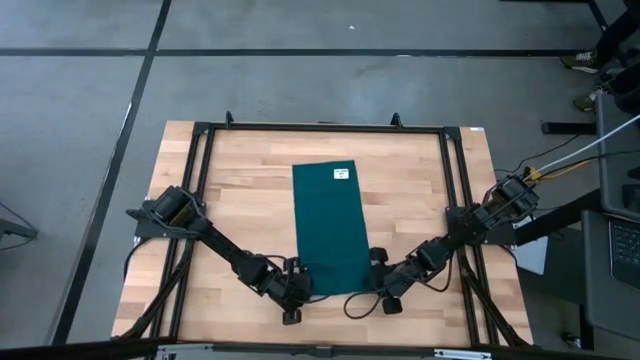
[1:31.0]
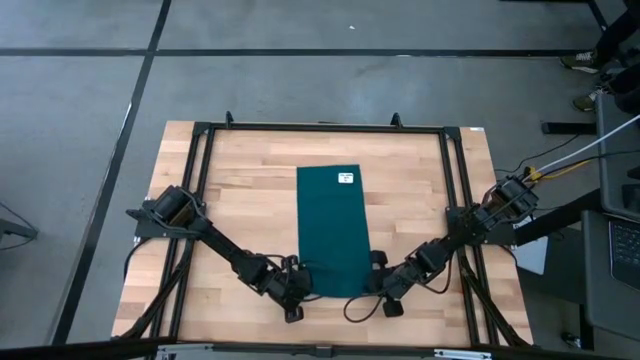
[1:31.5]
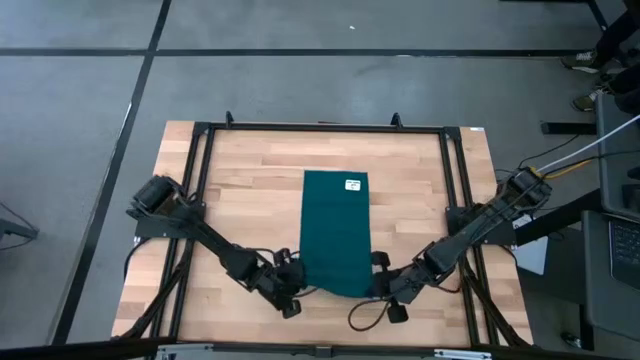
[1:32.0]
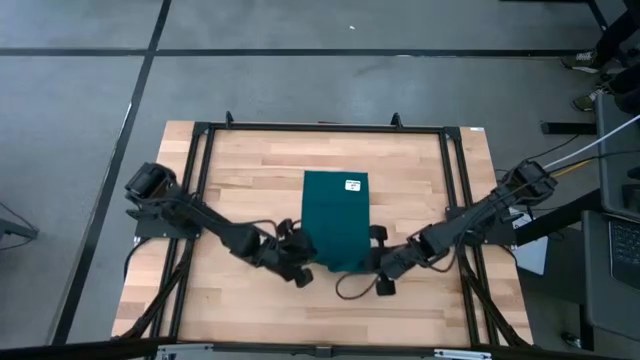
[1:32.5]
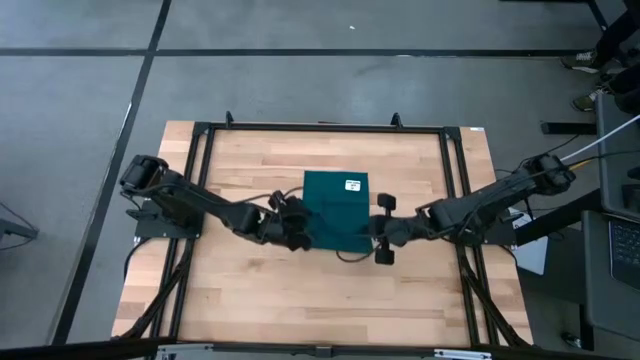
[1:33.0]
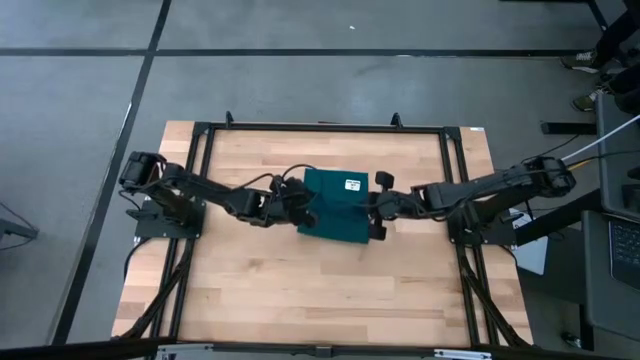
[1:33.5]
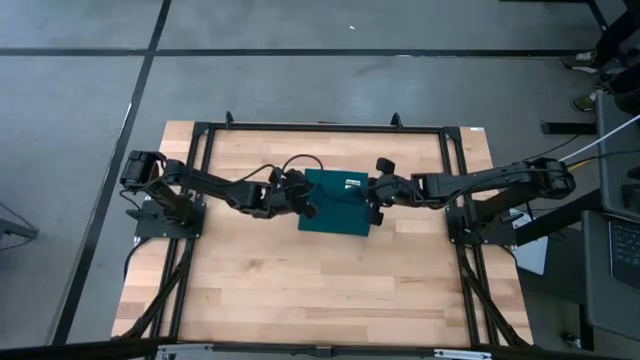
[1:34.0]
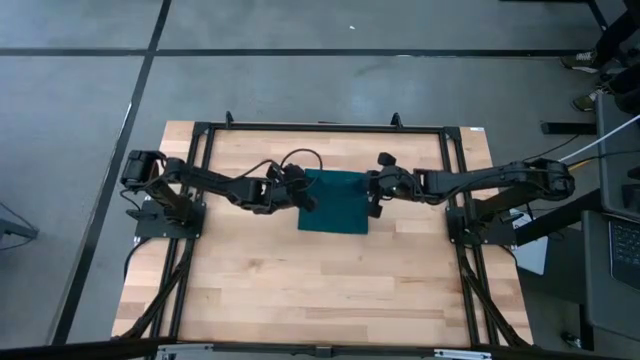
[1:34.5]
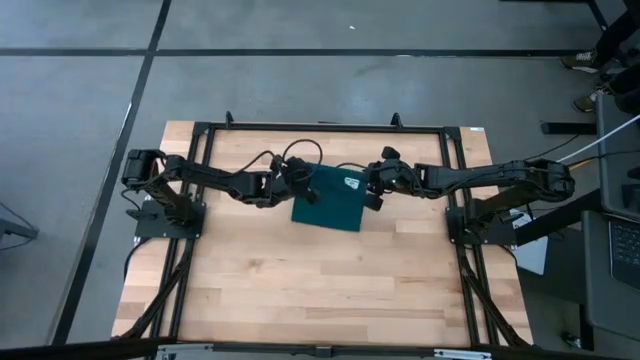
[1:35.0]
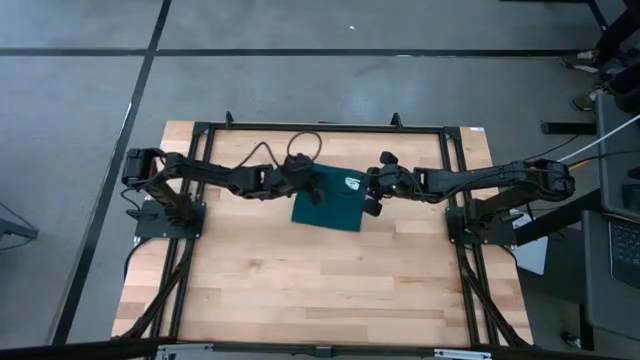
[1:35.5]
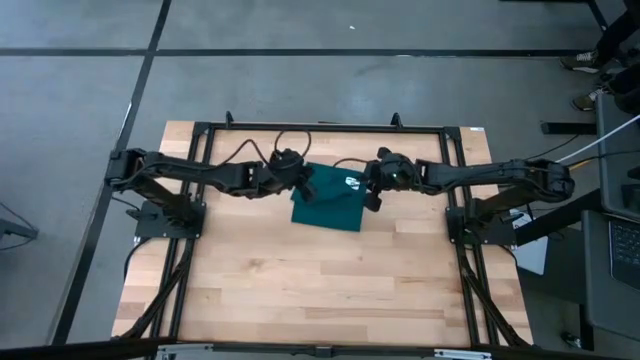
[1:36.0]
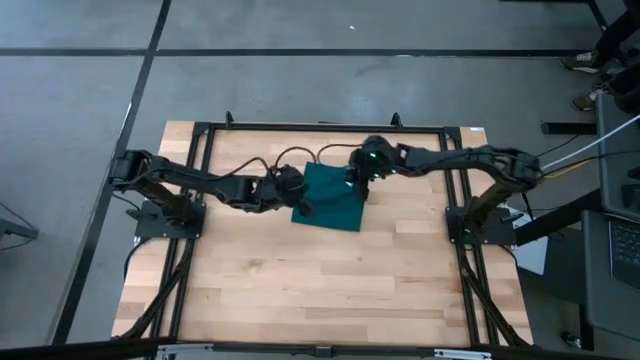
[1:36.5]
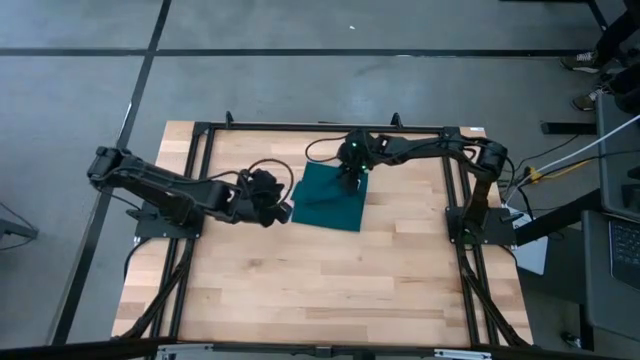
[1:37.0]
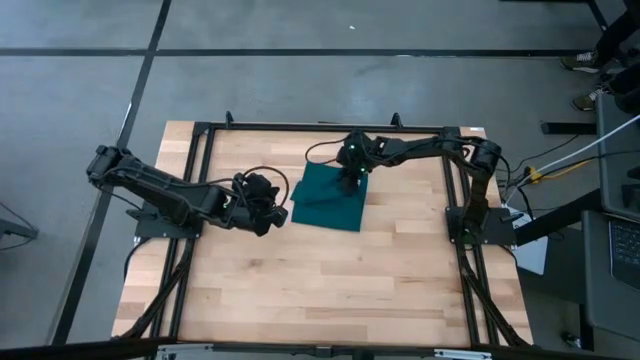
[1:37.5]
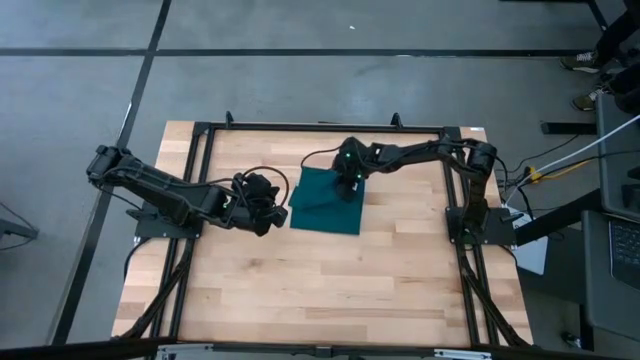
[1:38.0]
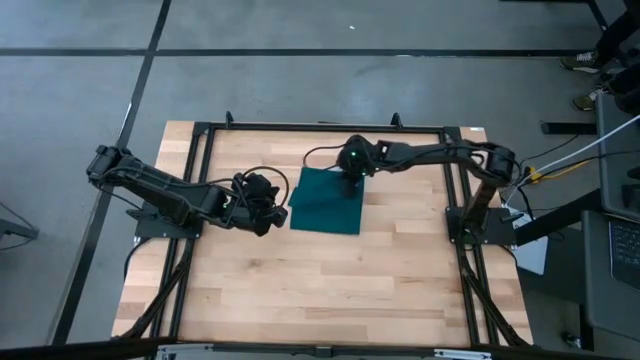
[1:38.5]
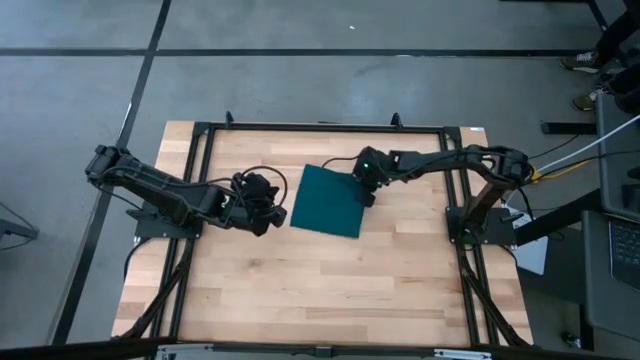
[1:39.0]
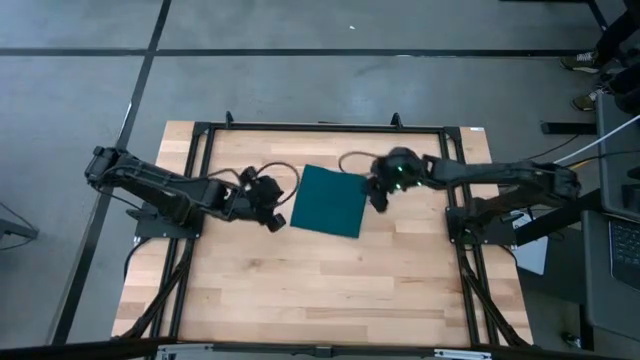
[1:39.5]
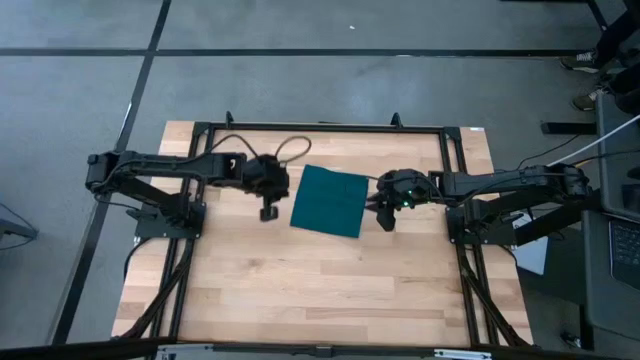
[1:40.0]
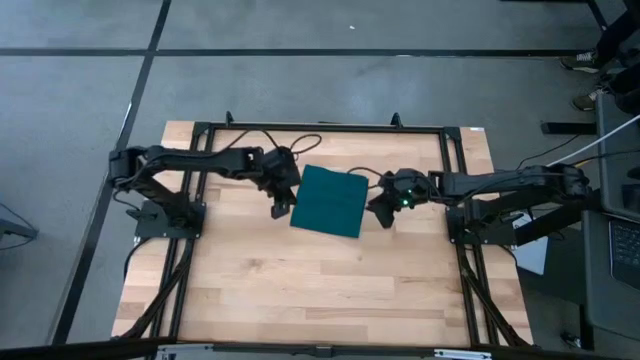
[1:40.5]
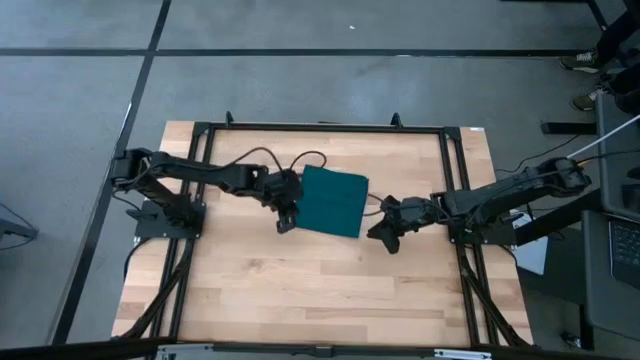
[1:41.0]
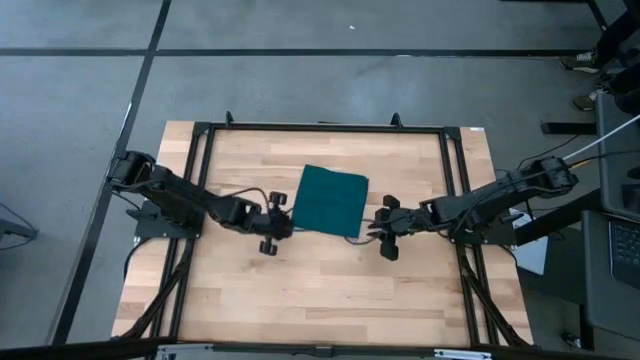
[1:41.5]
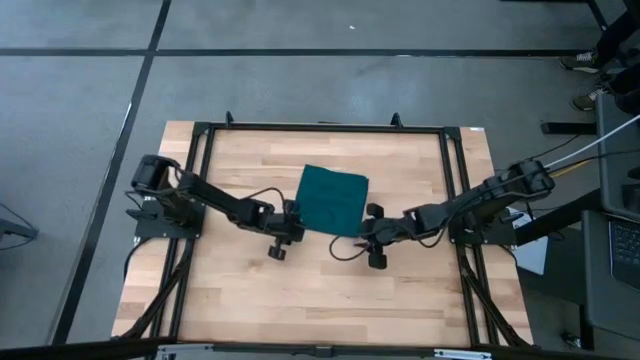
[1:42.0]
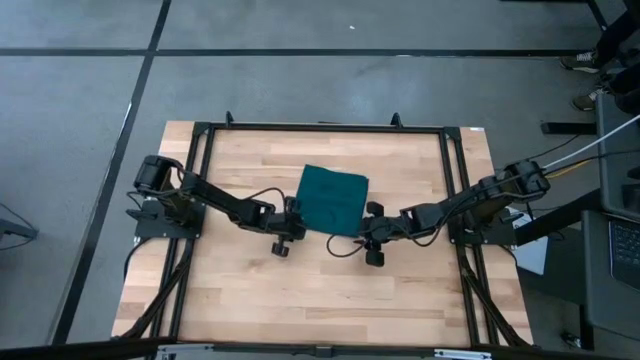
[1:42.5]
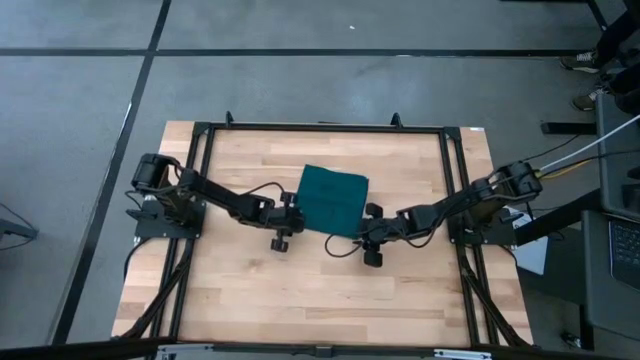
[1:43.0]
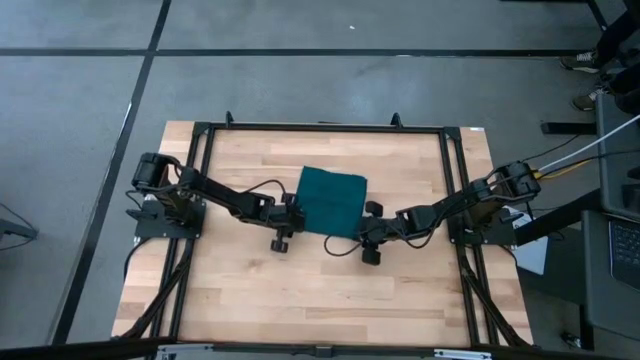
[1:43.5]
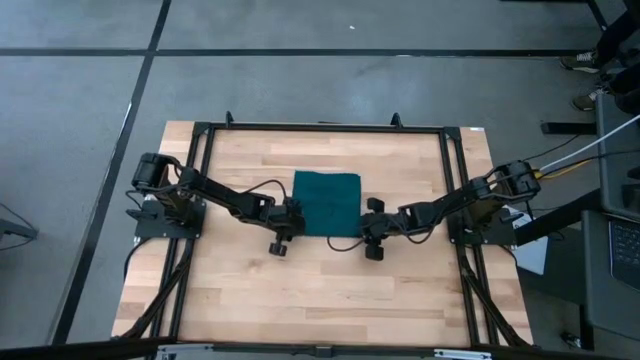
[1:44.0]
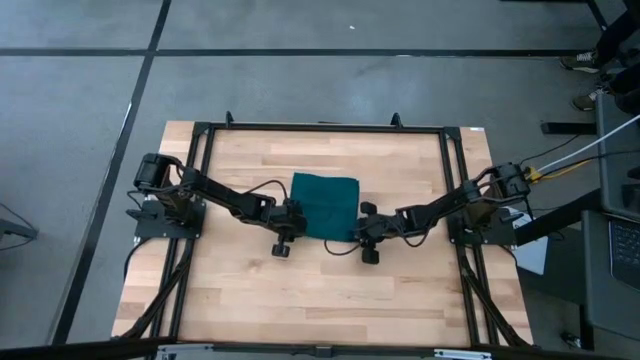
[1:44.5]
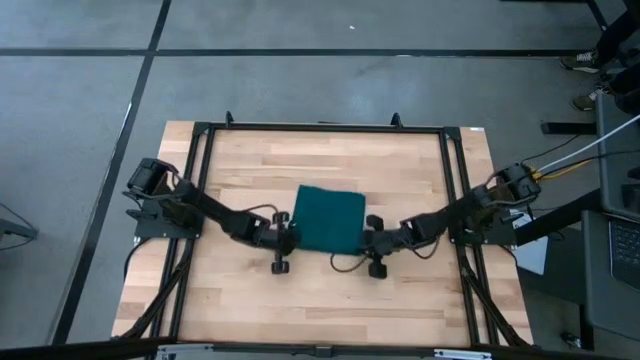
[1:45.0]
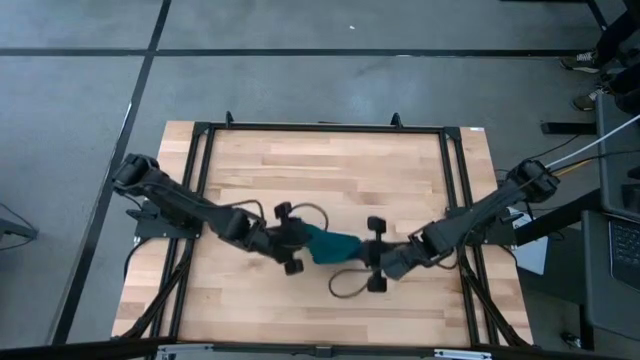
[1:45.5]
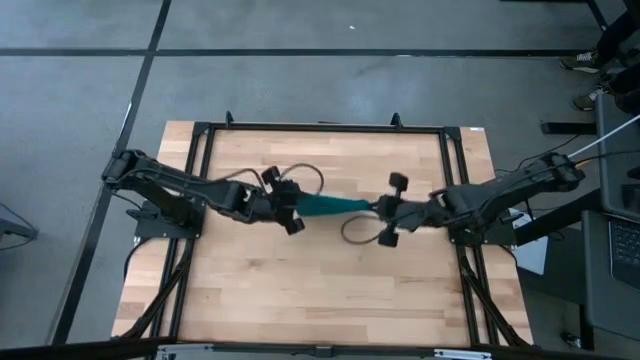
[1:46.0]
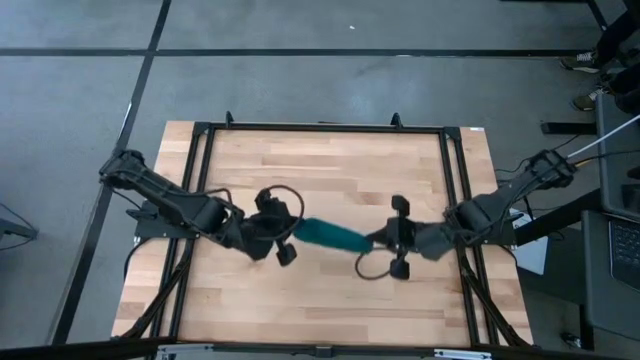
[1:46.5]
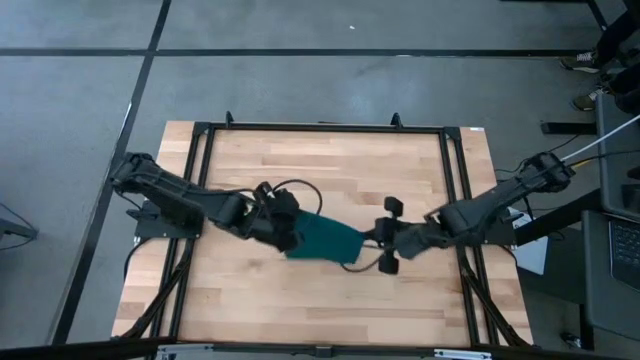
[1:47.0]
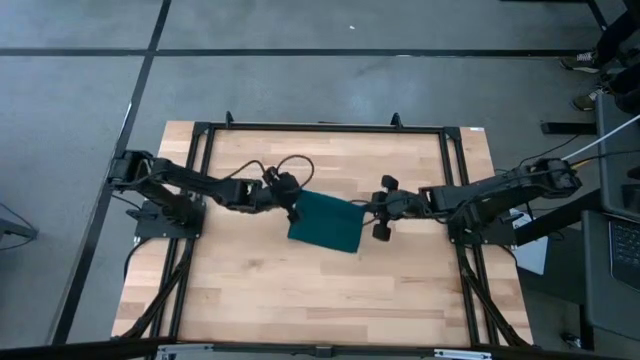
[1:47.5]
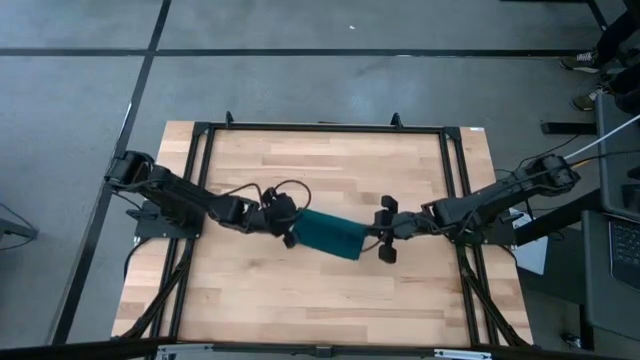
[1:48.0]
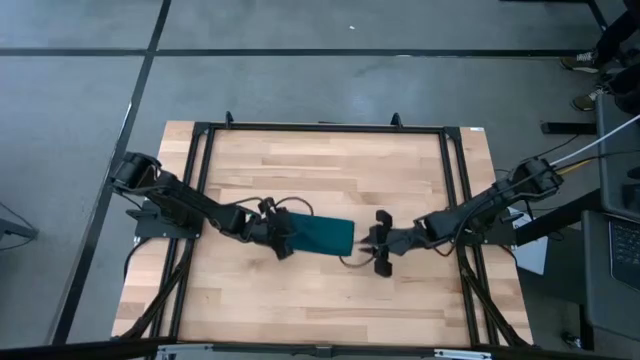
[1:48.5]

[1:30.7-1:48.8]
Task: Fold microfiber towels
Fold the green towel

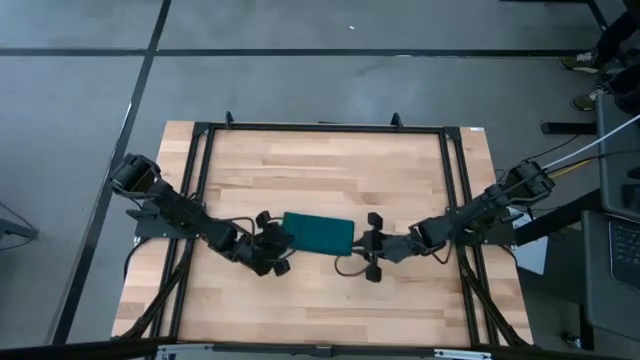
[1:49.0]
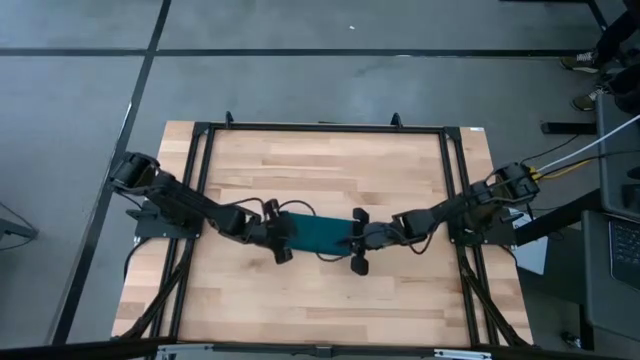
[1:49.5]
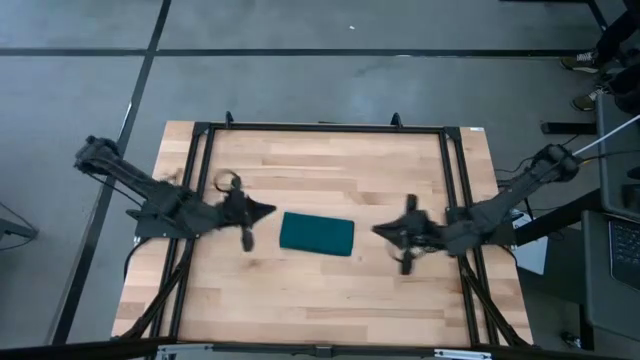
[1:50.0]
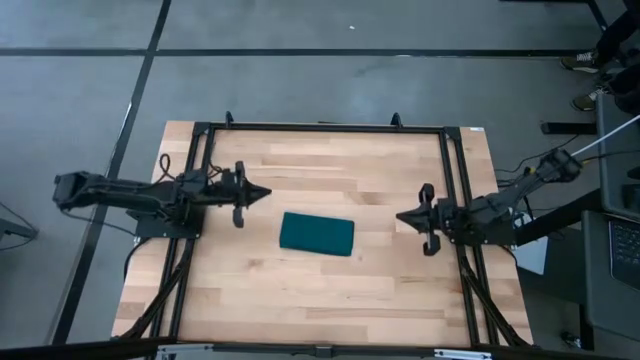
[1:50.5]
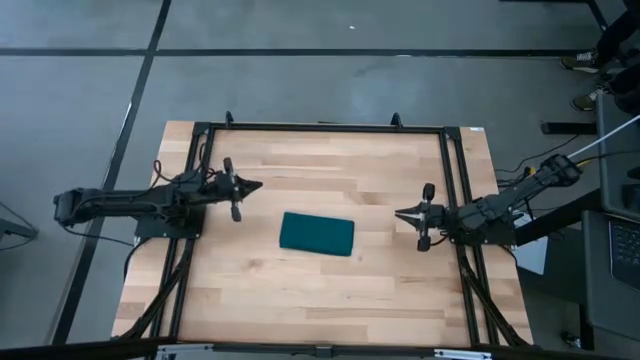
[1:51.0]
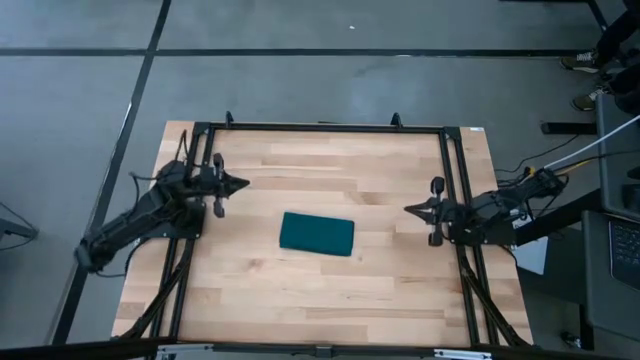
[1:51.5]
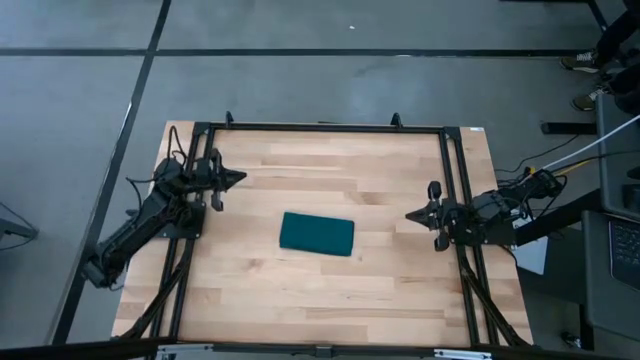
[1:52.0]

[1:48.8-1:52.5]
Return To Home Position
